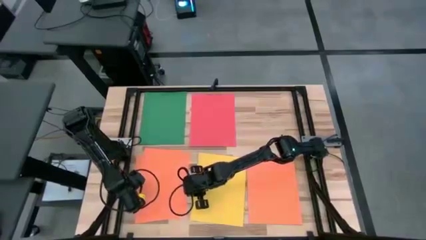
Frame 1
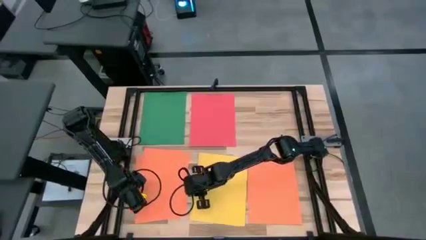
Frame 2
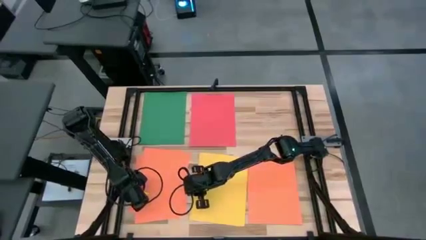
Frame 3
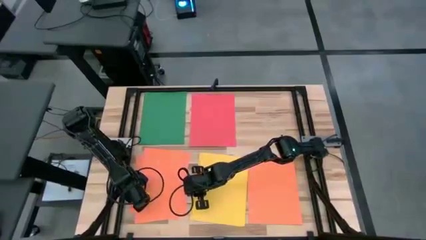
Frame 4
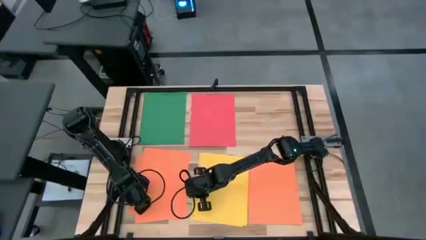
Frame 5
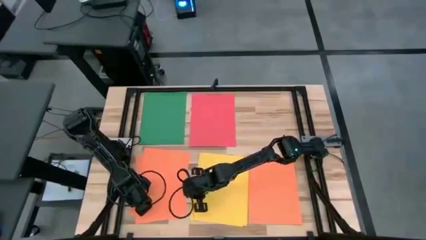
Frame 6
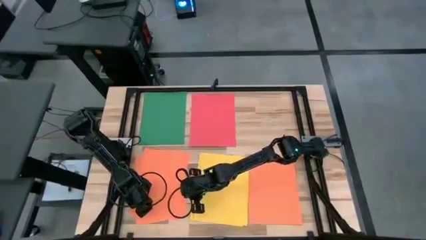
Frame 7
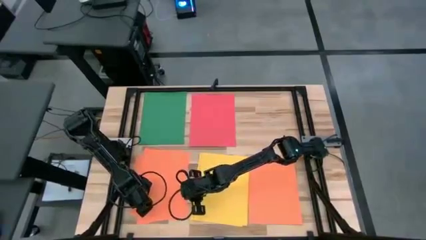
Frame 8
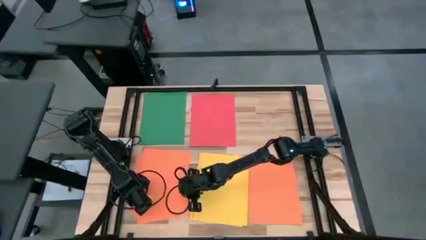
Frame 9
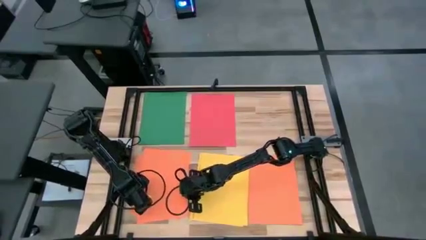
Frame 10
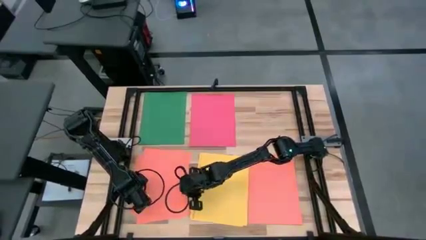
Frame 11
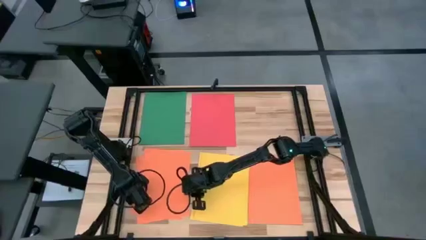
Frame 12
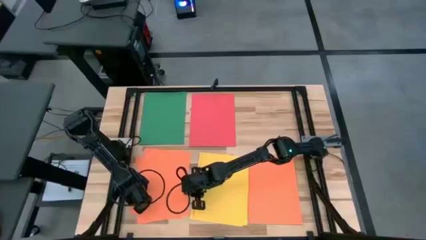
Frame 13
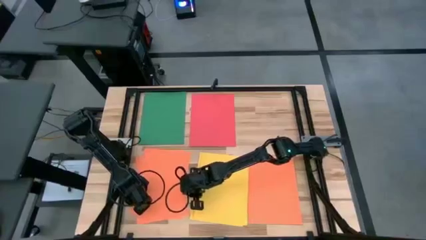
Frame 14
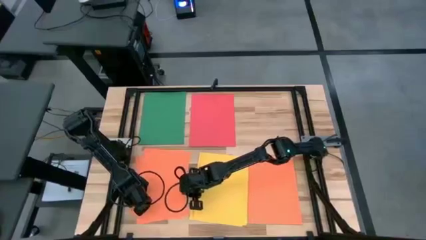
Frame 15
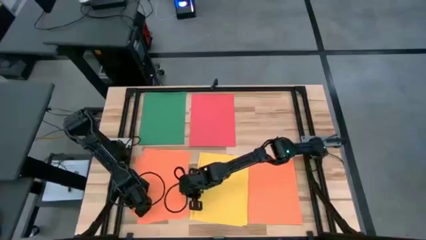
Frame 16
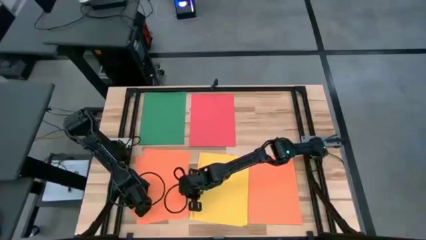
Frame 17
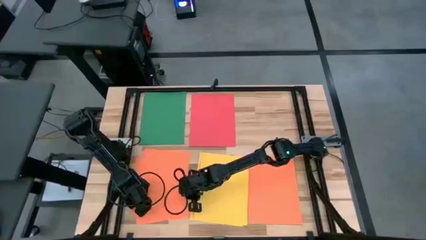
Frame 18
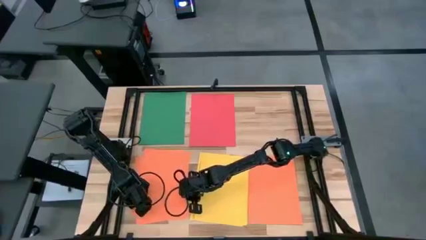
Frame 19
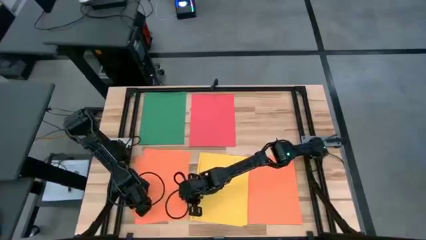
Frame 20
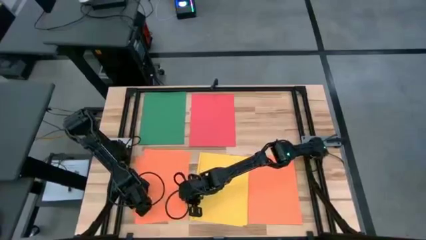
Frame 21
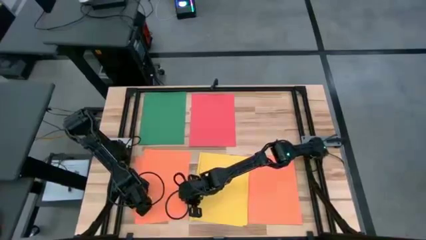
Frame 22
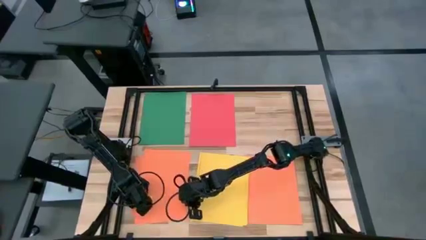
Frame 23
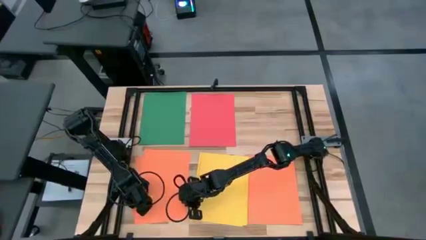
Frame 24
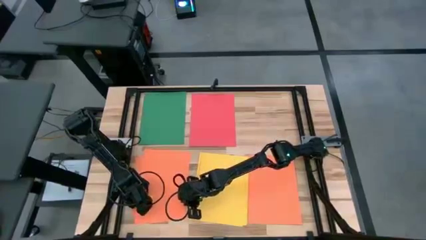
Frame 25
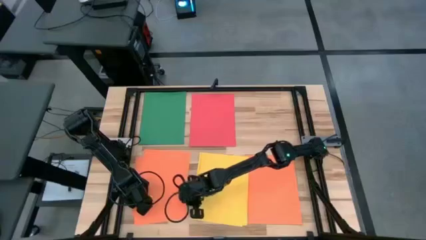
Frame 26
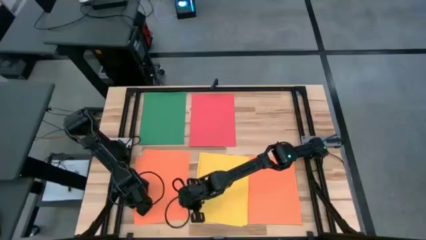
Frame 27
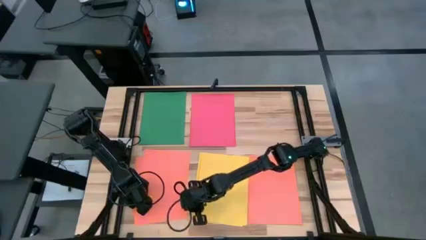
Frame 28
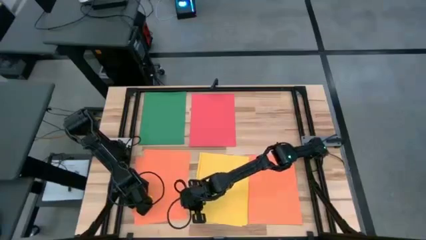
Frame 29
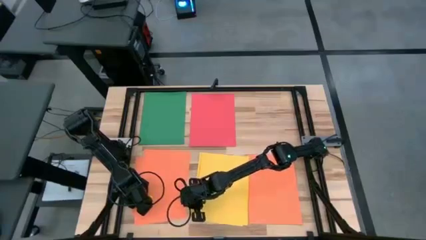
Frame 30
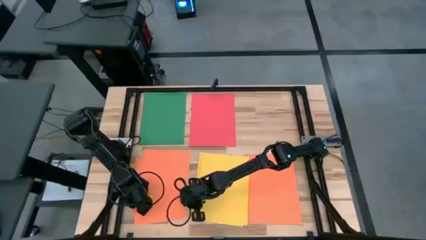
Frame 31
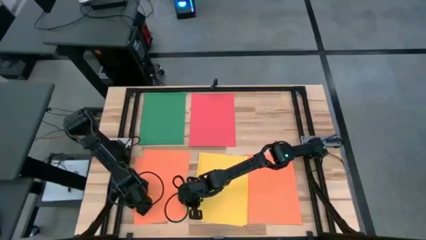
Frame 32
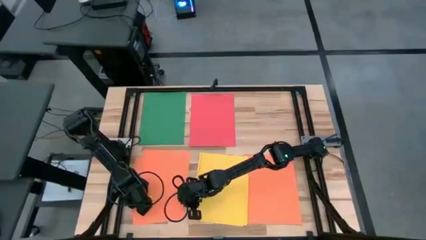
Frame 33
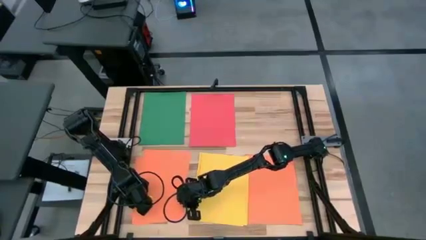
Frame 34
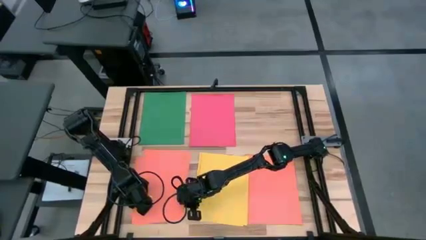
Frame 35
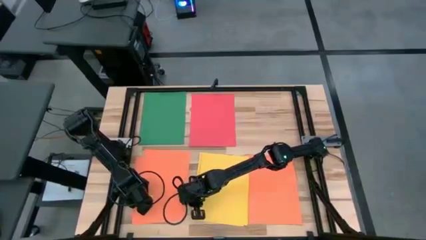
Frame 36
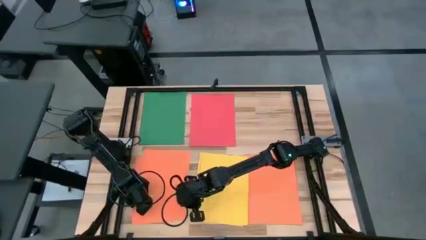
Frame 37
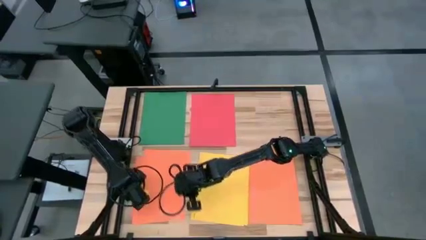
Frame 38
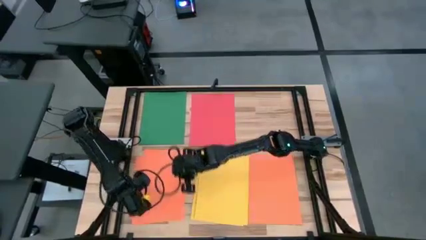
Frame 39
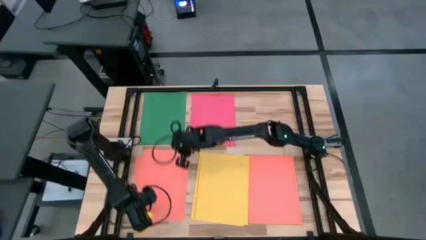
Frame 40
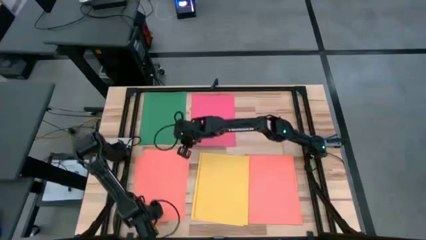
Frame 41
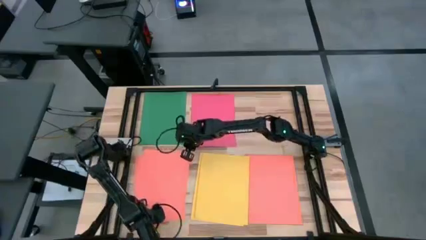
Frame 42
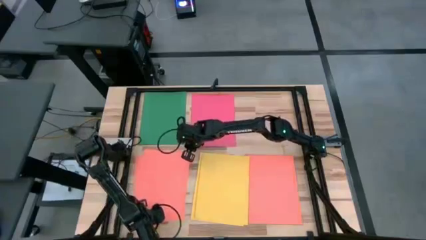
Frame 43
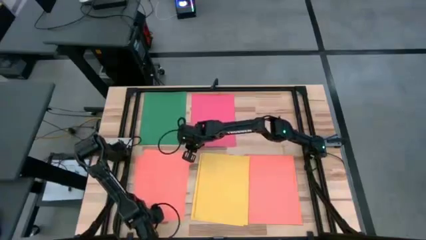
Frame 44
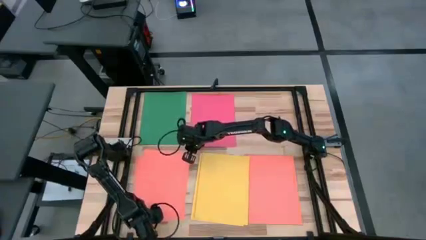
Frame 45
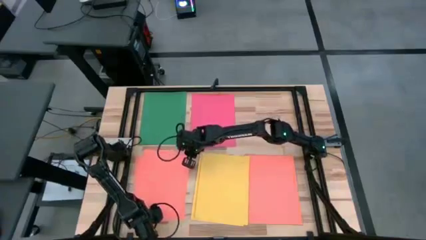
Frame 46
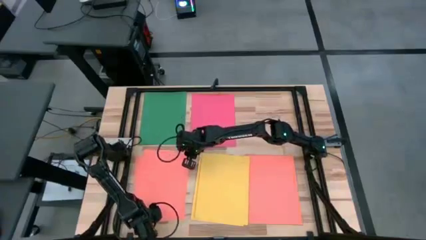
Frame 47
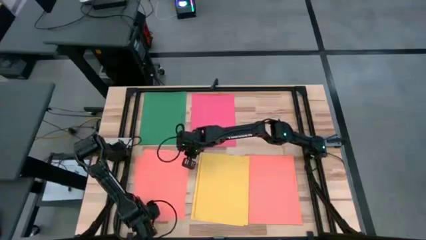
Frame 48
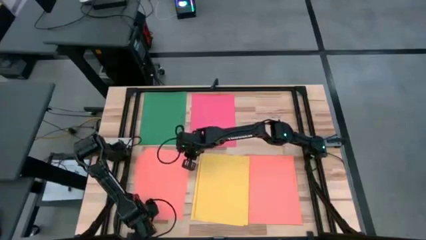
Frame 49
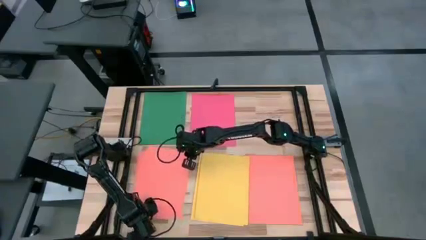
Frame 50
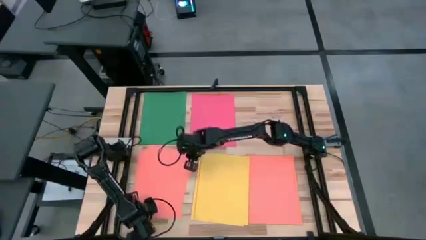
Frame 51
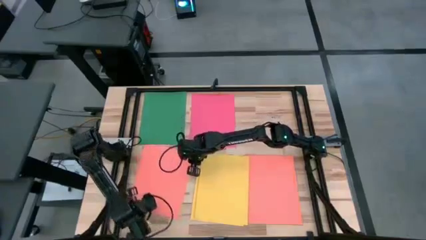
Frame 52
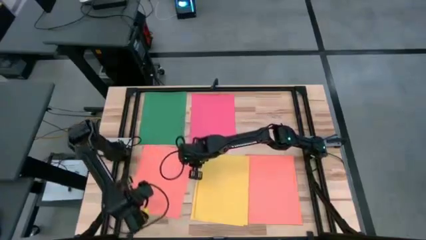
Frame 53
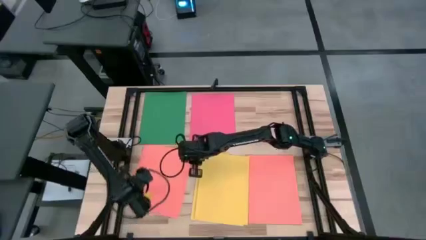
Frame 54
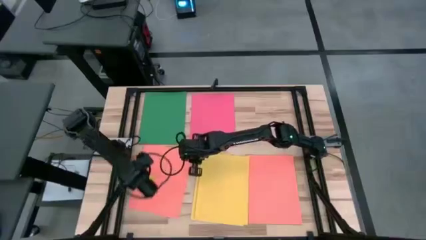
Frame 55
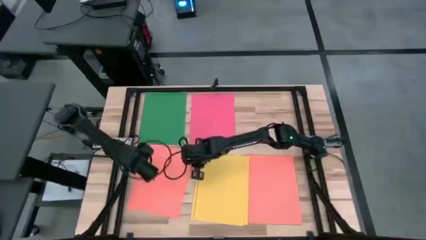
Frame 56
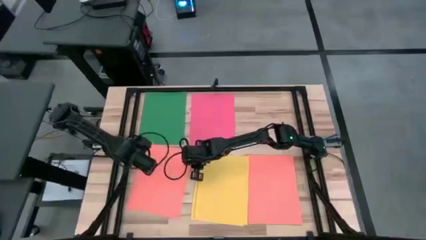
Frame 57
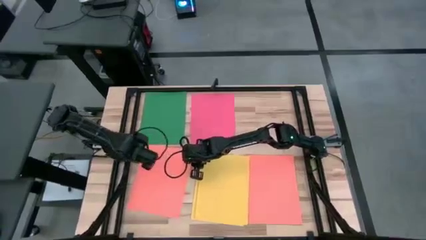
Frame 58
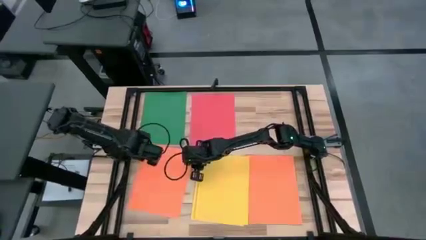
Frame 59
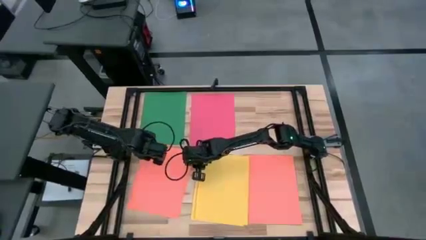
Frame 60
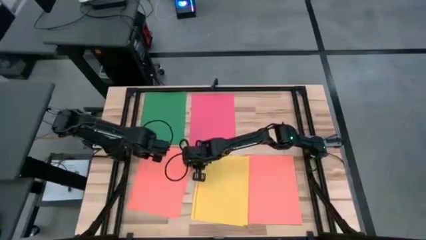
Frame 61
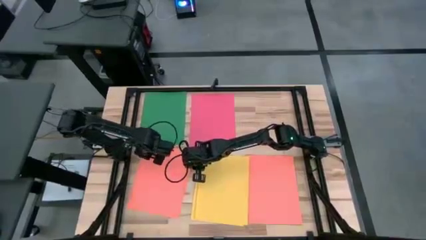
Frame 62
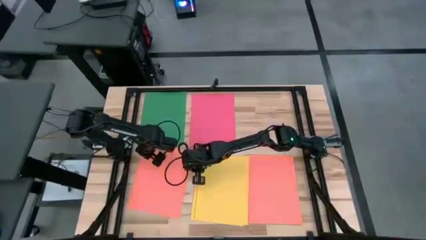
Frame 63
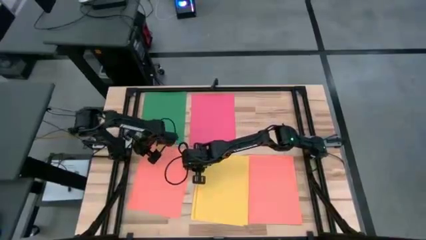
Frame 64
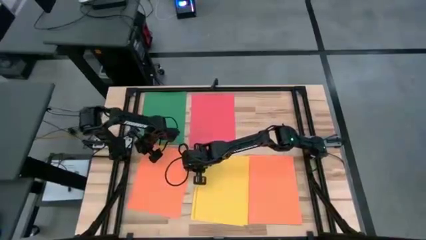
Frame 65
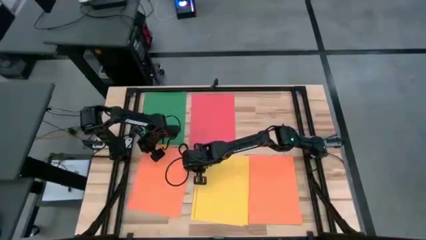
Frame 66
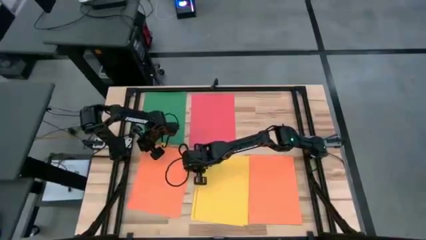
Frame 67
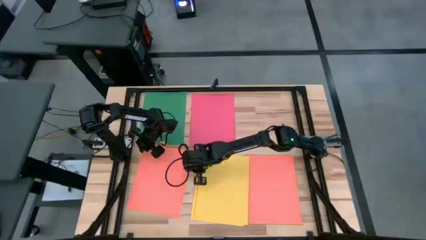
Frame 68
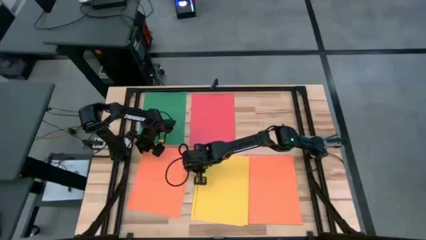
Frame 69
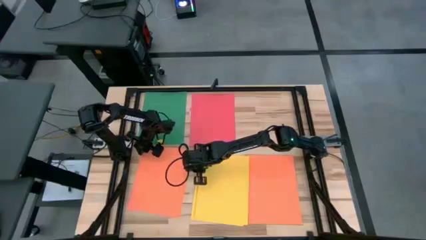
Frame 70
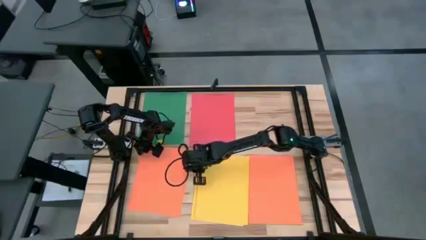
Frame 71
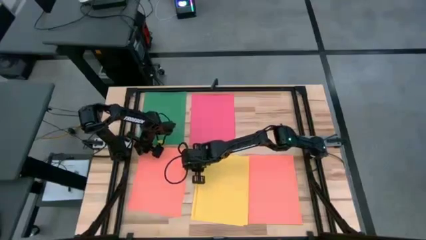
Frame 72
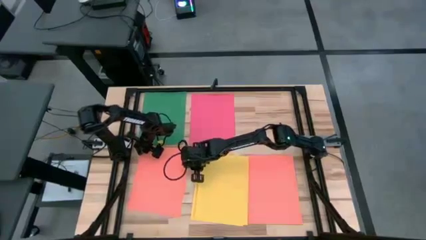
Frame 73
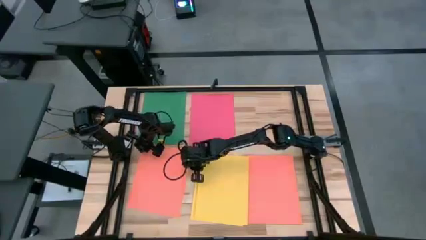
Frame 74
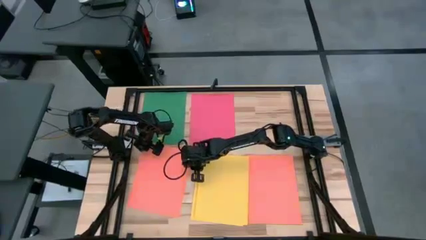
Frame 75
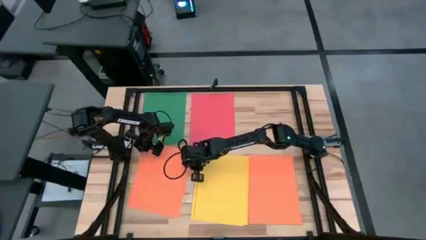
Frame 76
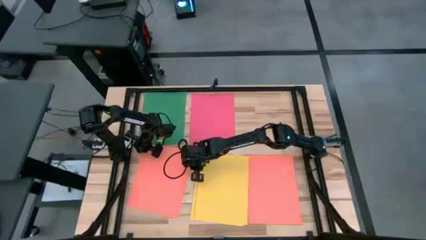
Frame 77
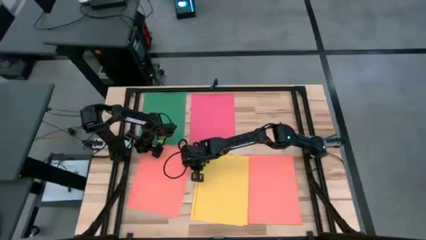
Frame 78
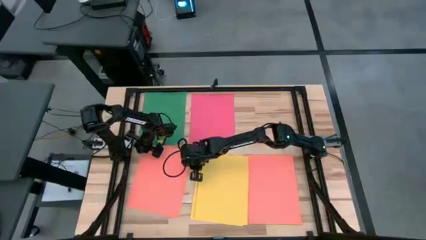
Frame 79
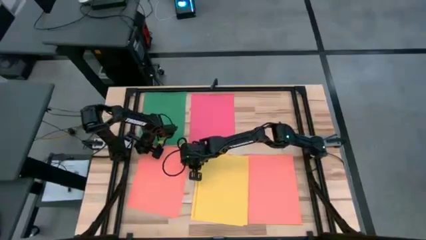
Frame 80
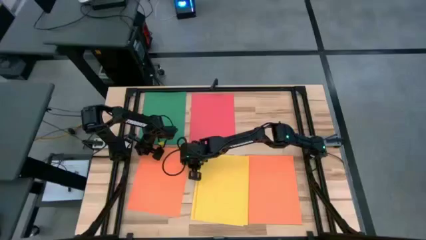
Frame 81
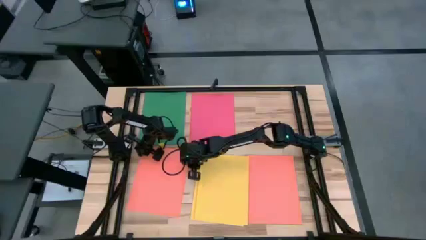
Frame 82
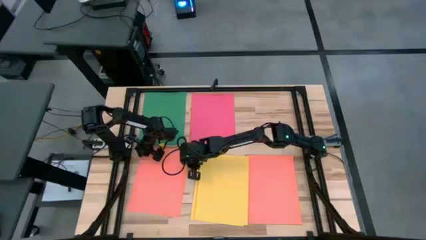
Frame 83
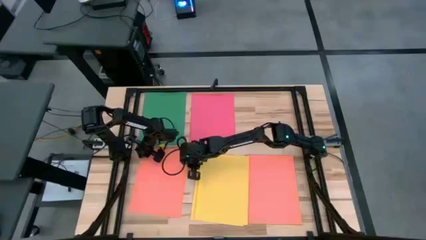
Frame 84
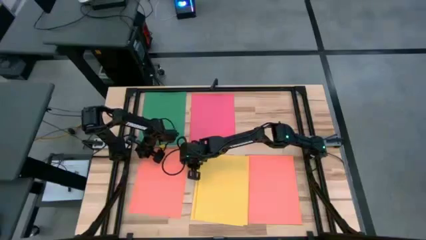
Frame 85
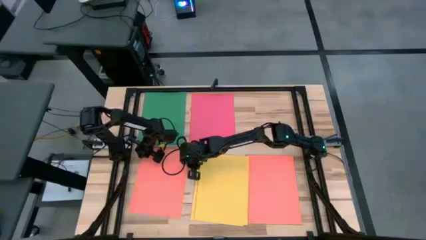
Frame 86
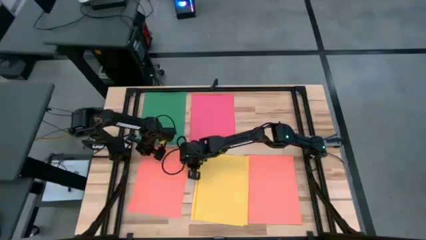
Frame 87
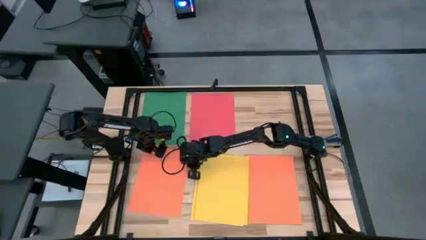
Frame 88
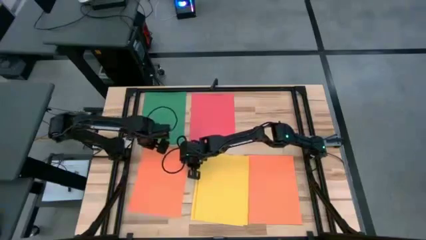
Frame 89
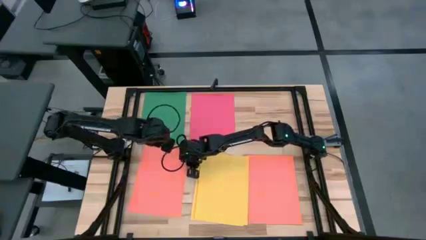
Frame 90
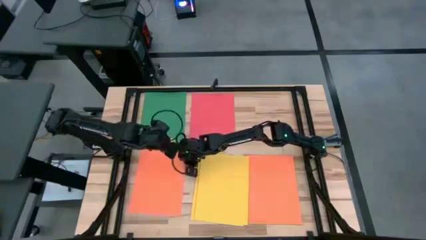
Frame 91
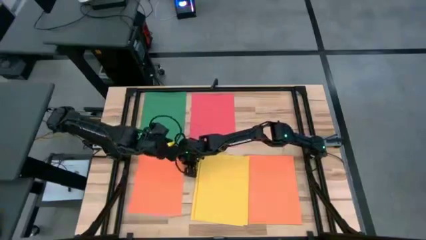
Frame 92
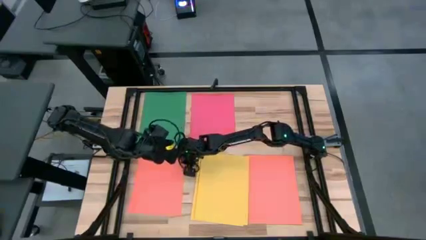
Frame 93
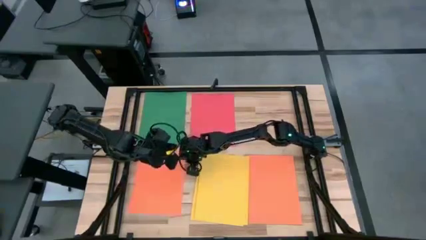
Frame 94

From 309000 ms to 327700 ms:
Task: Organize paper
Stack the orange paper on top of the orange paper
